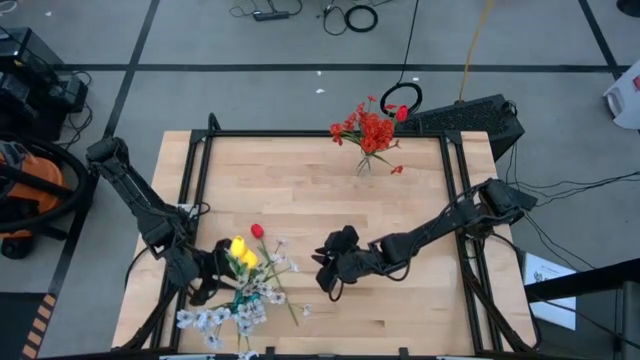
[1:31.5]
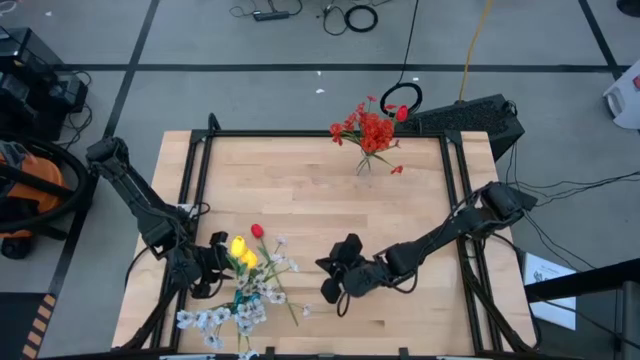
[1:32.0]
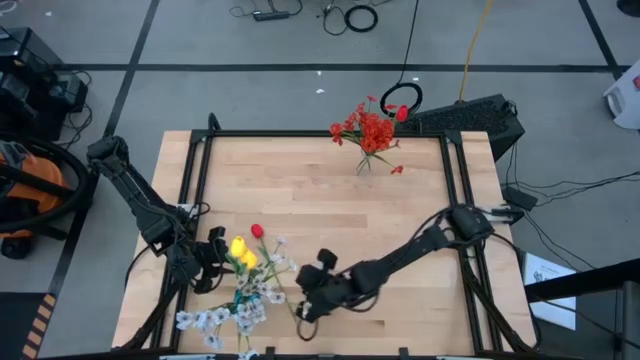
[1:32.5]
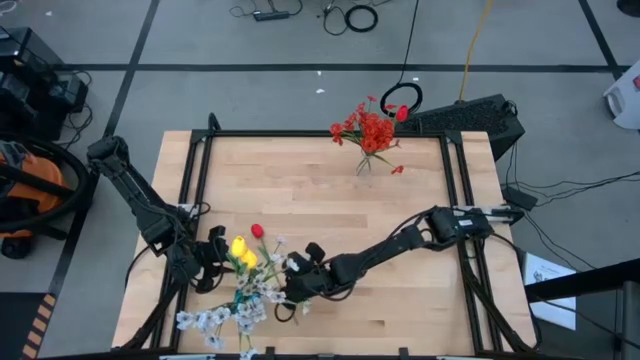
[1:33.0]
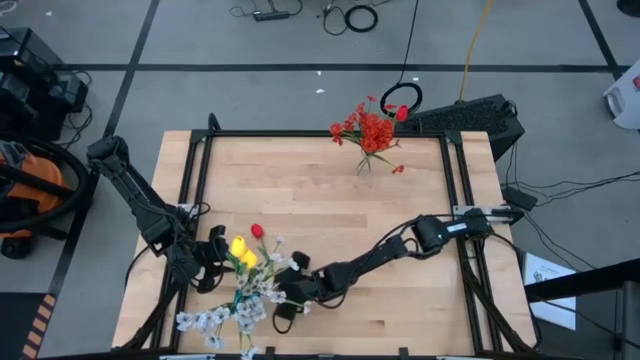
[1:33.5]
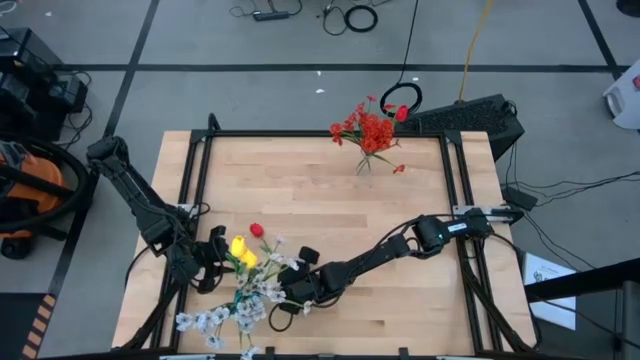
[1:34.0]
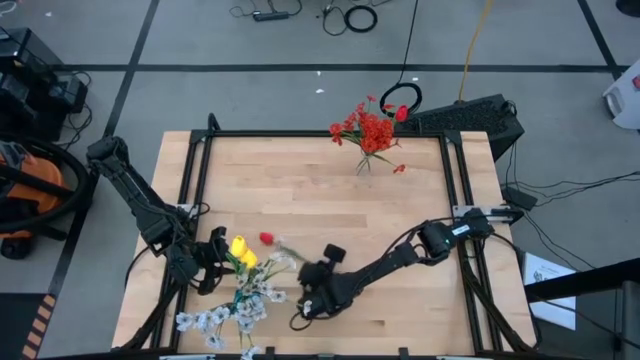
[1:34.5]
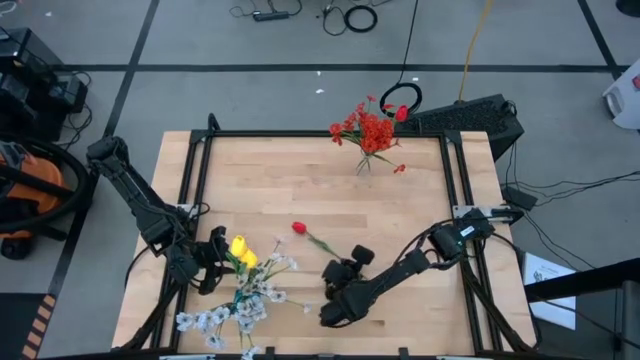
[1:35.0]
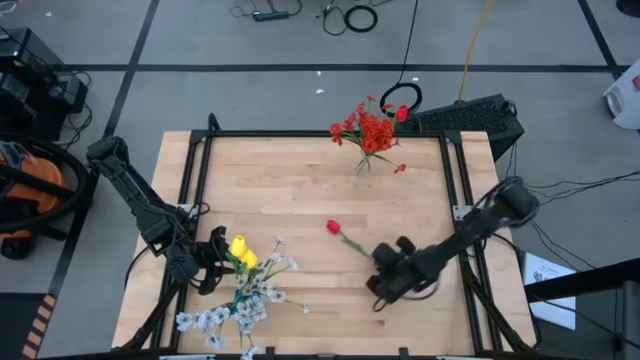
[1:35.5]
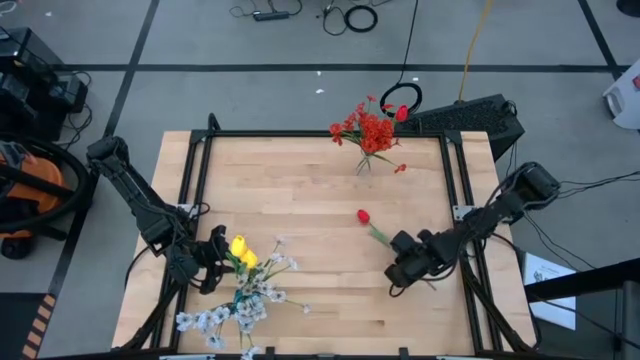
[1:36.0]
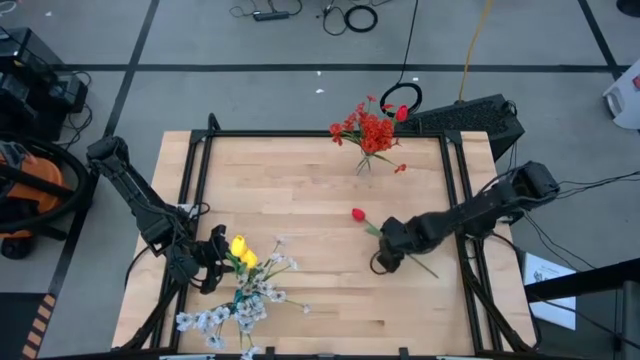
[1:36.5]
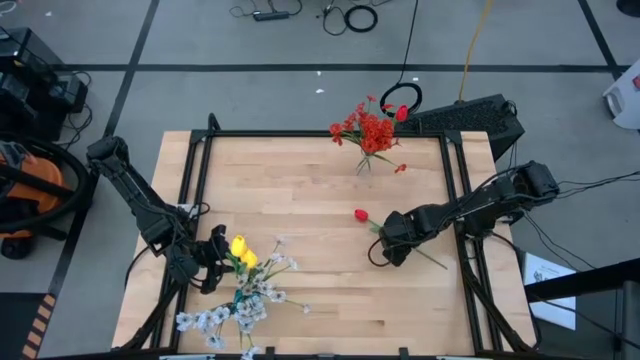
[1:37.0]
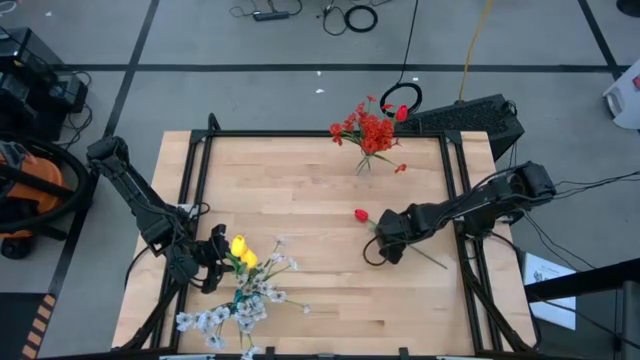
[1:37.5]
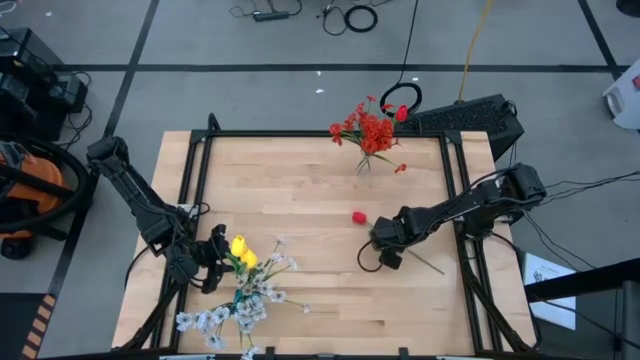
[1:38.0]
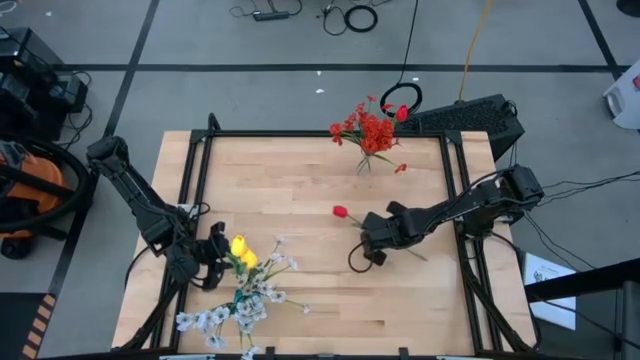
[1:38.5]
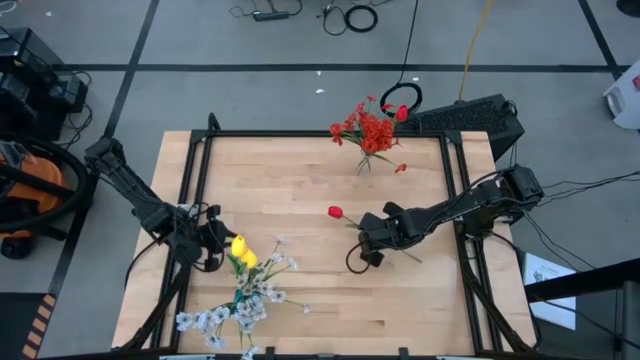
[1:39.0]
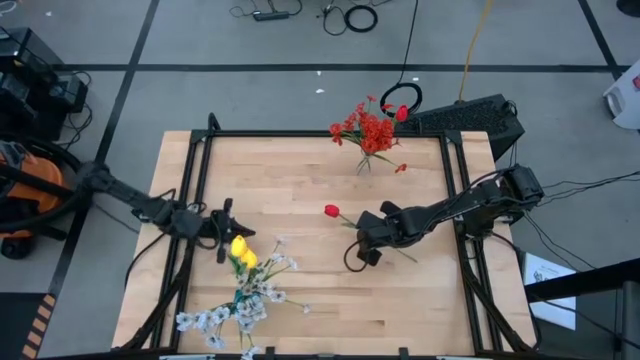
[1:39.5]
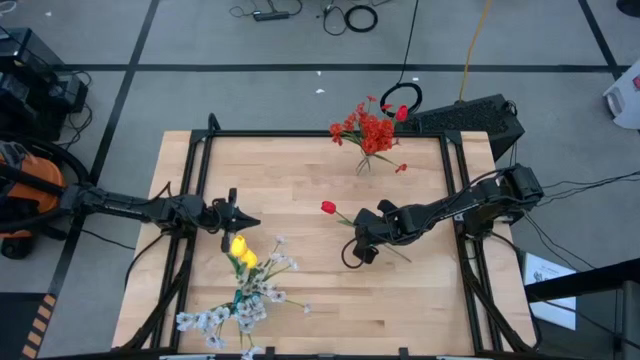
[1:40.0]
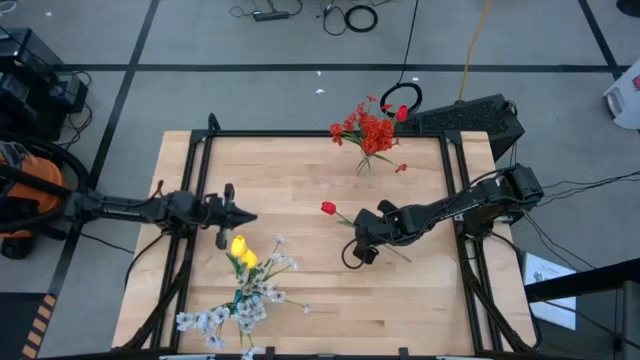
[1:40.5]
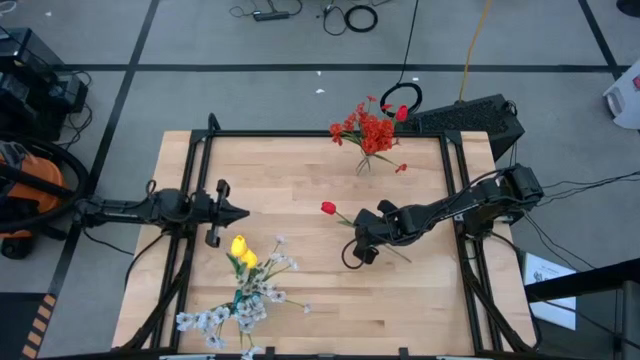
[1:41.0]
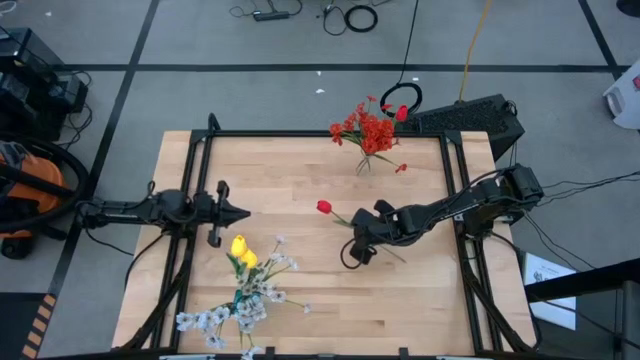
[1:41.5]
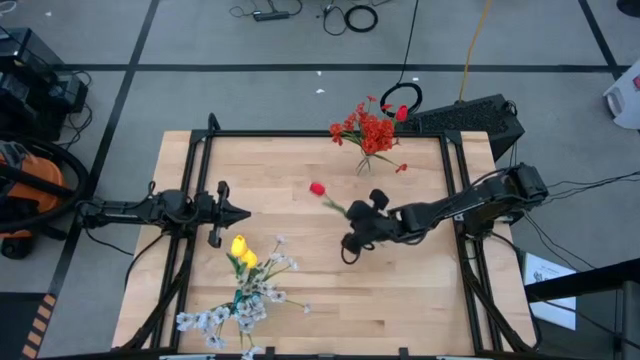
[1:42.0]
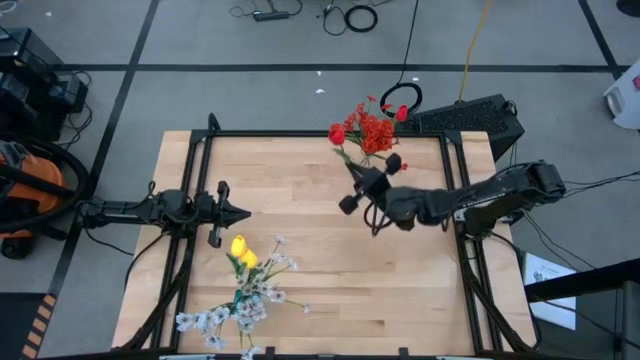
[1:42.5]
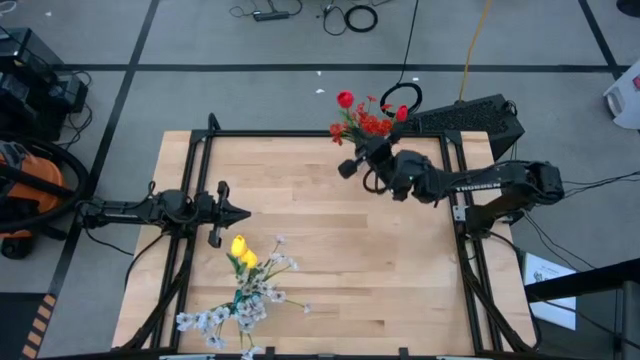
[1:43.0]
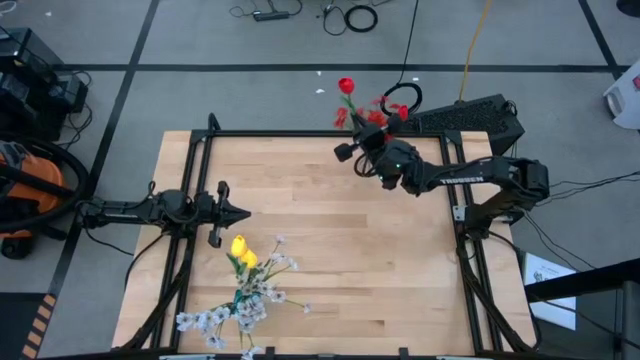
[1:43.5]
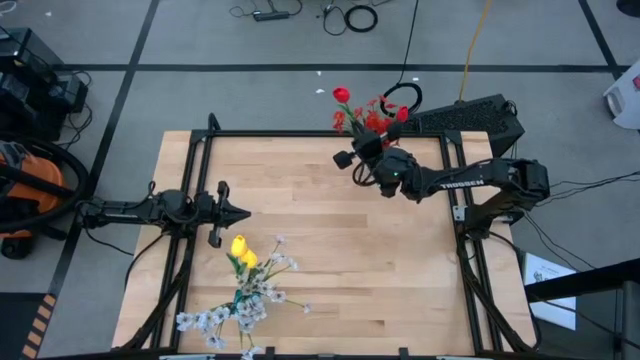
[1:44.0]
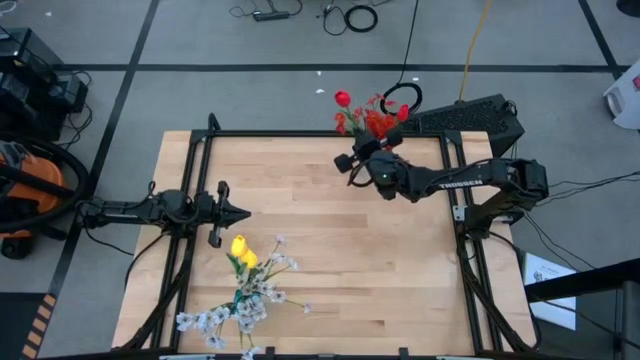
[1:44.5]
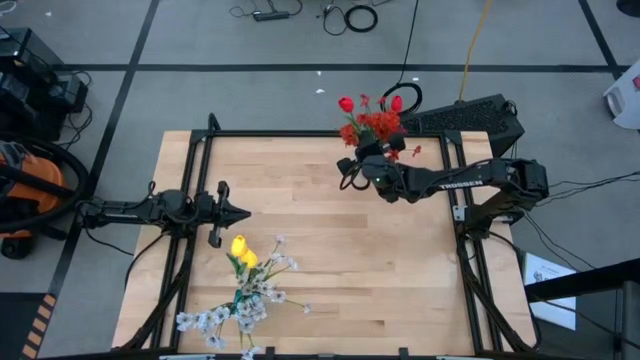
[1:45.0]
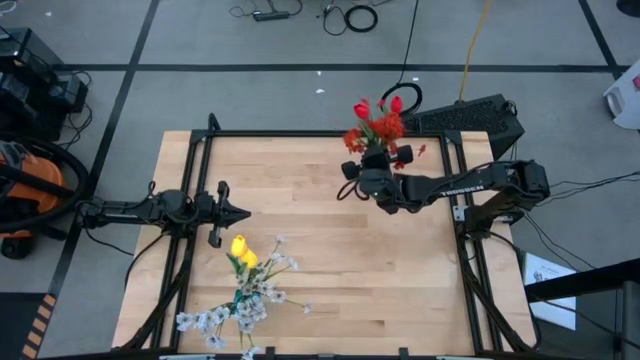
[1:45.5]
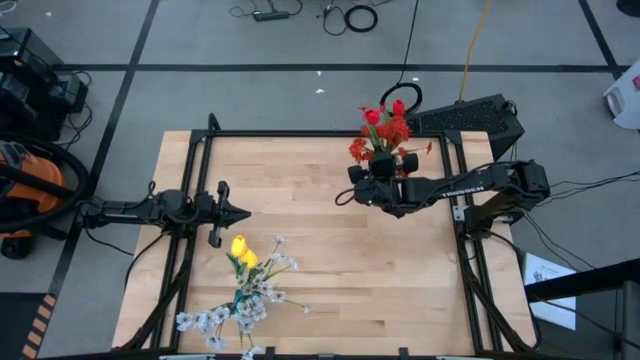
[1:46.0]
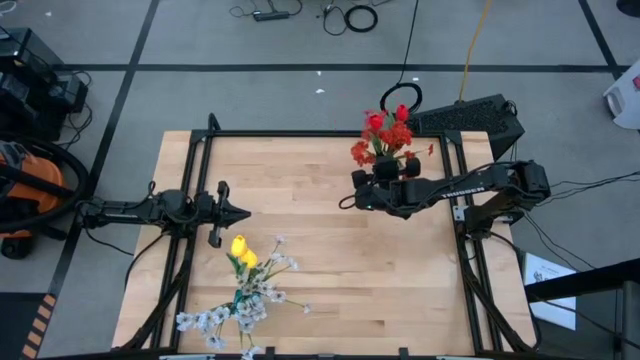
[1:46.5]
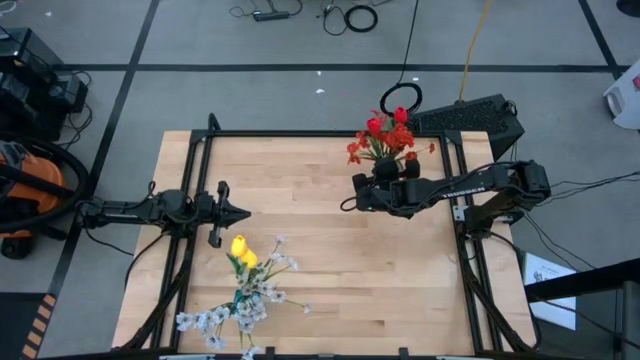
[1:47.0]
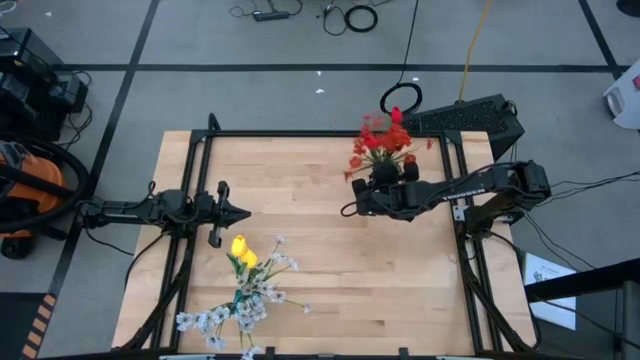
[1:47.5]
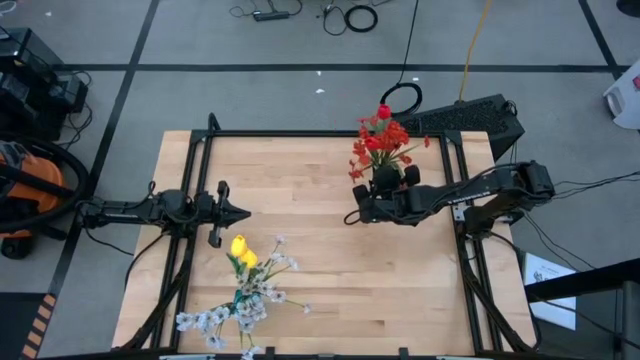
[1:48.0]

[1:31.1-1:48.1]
Task: Sort flowers into vase by color
Put the red flower into transparent flower vase
